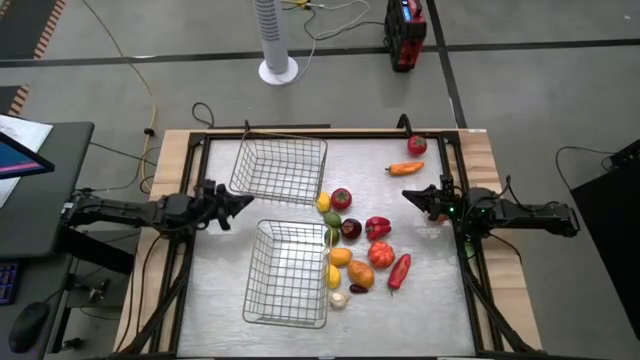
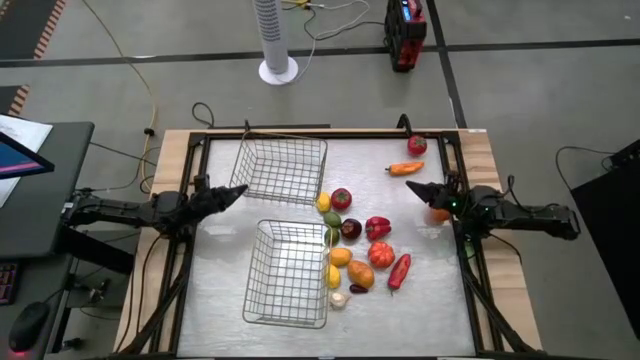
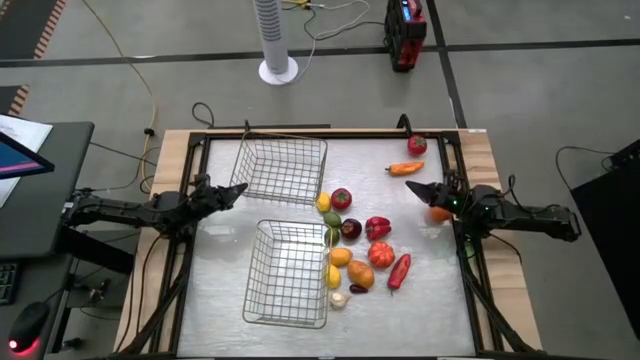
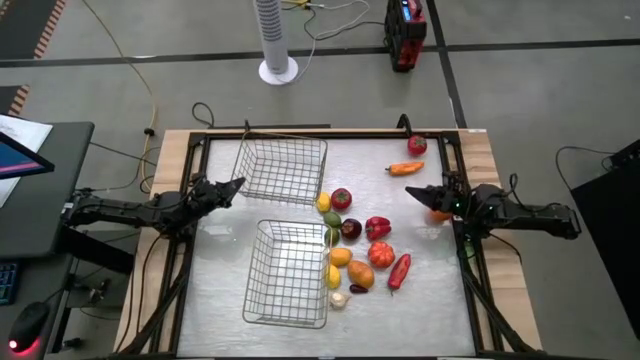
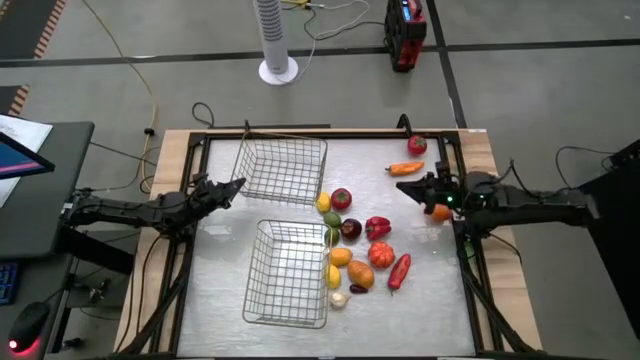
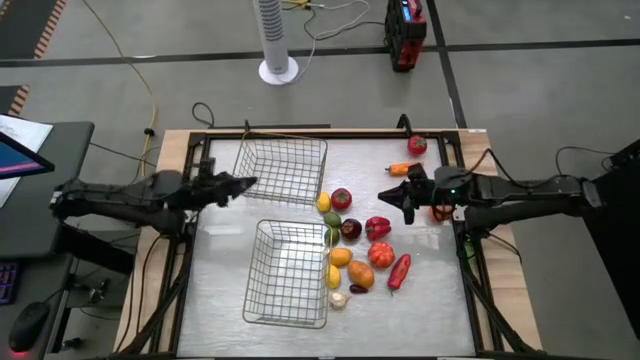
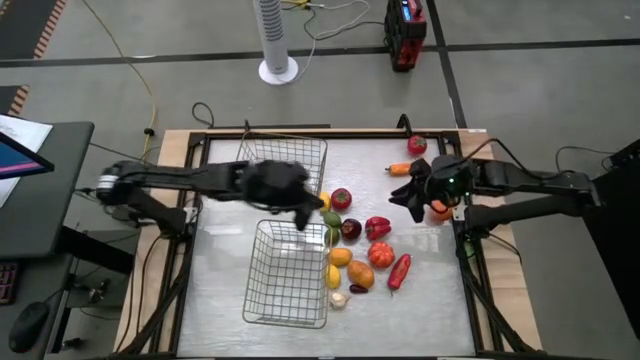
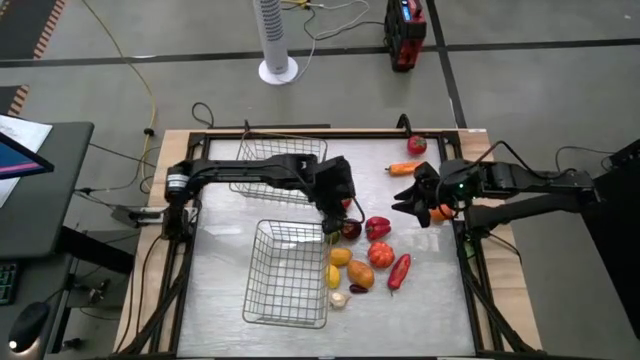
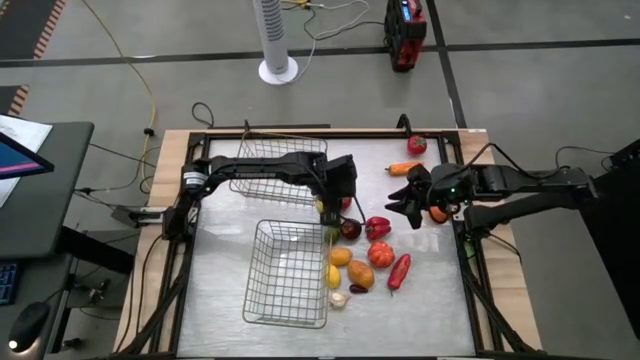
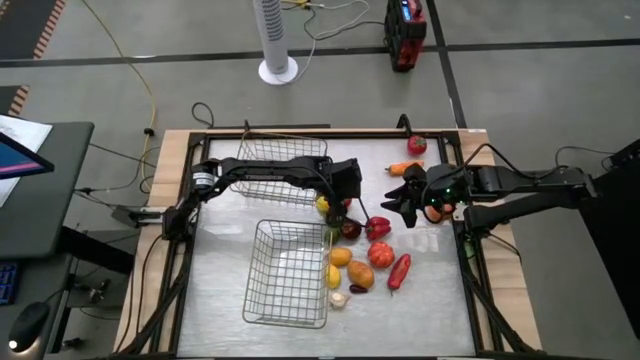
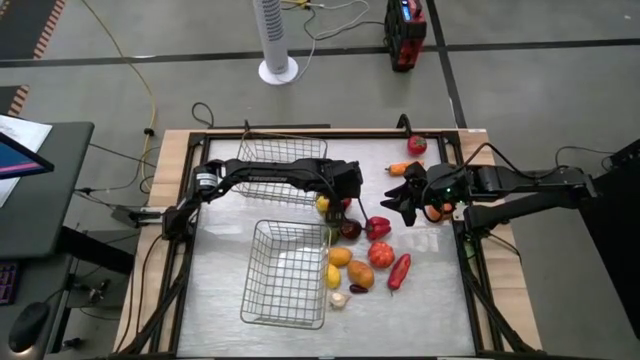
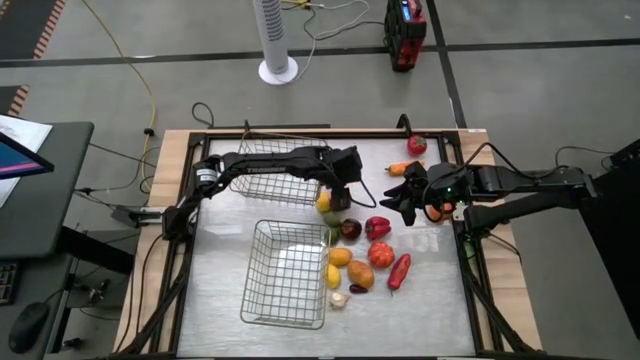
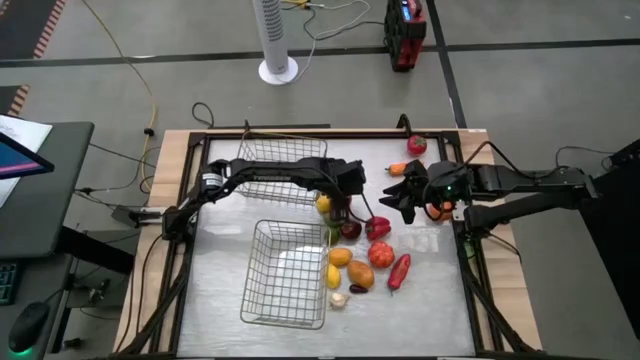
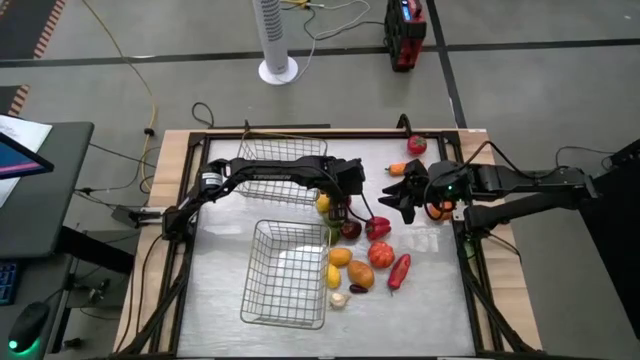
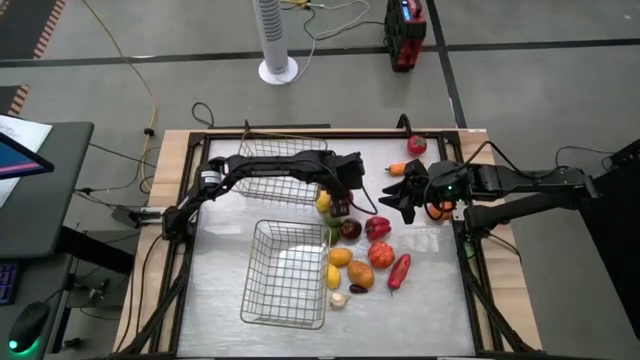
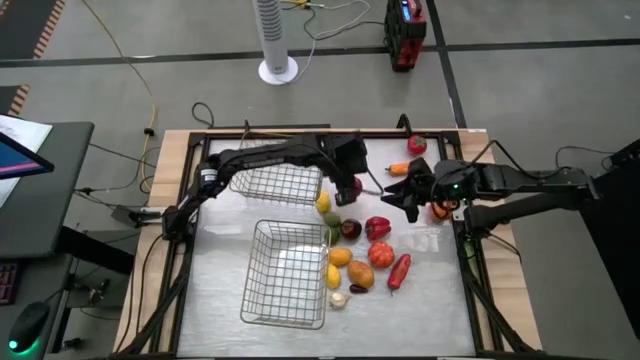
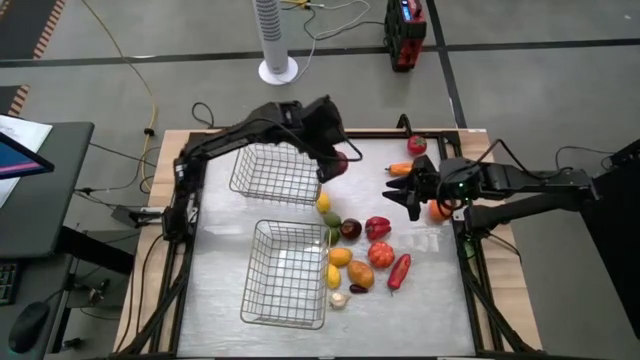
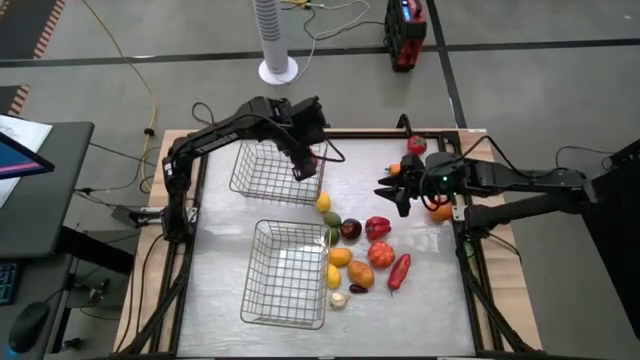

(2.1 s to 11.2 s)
Task: Sort produce into baskets
Put the bottom tomato into the top wire basket

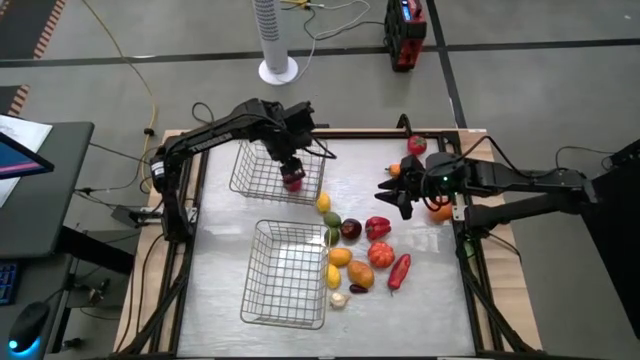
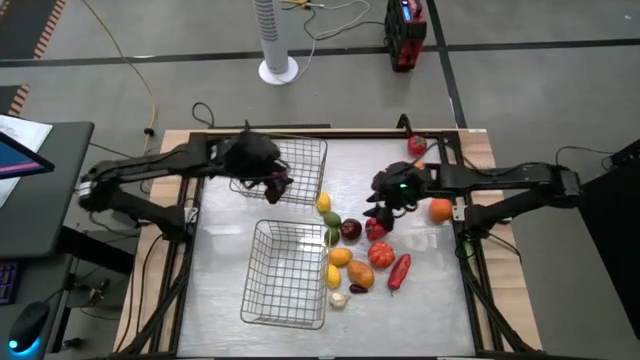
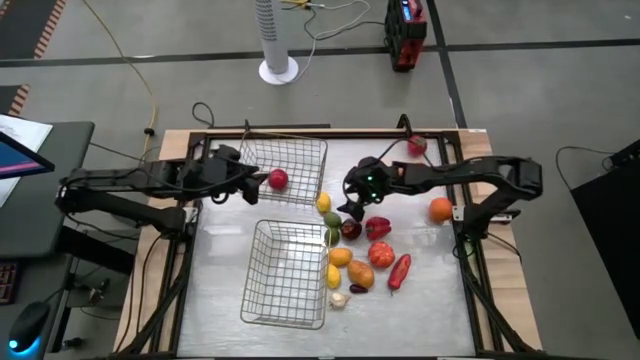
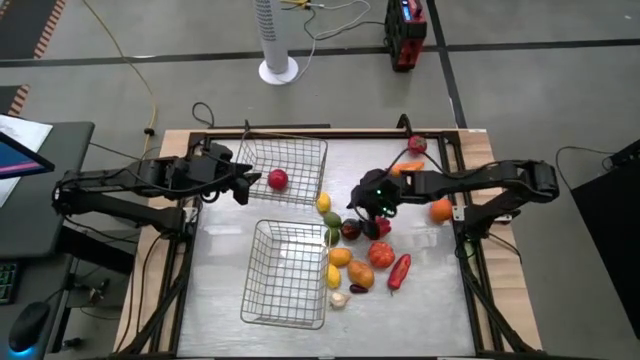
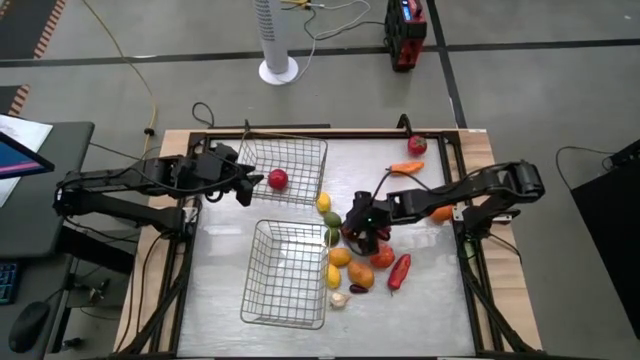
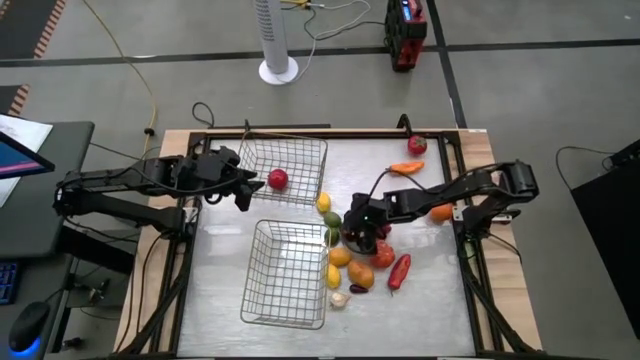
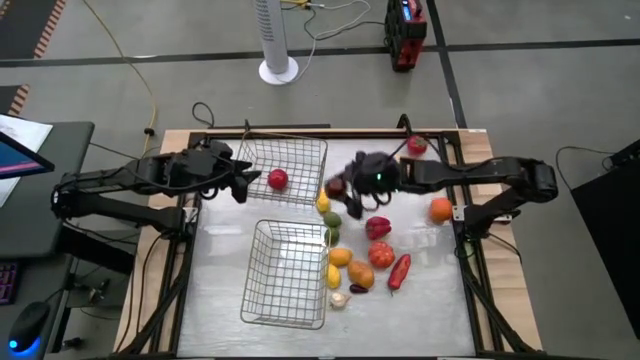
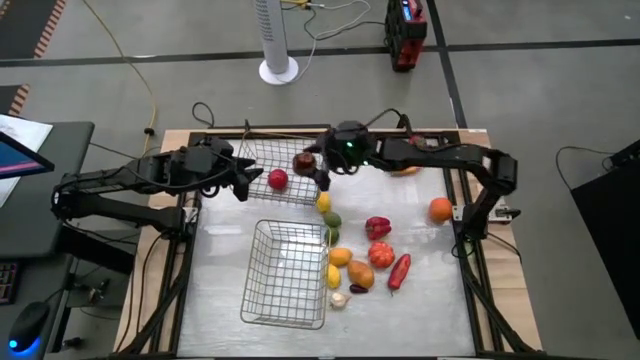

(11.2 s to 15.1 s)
Put the apple into the top wire basket

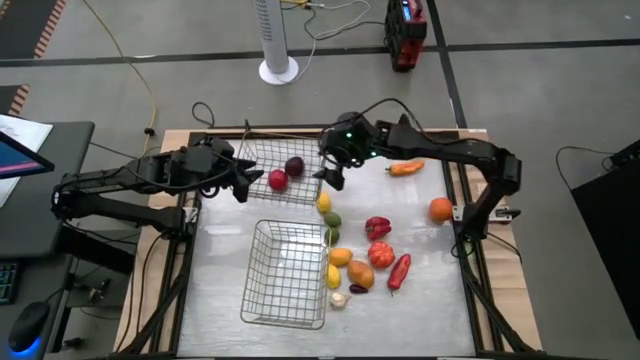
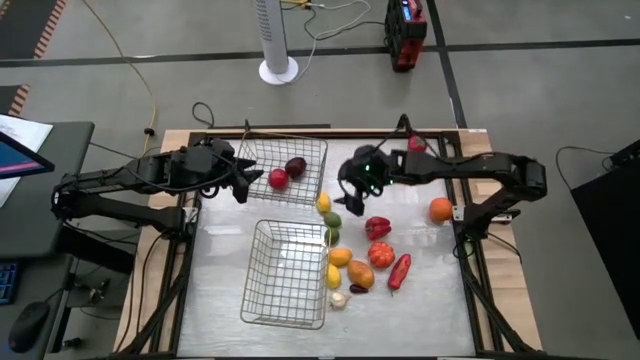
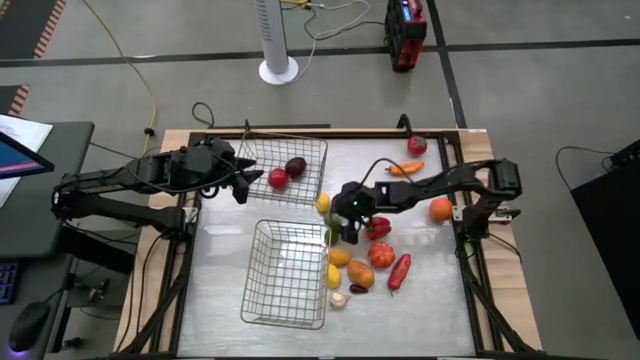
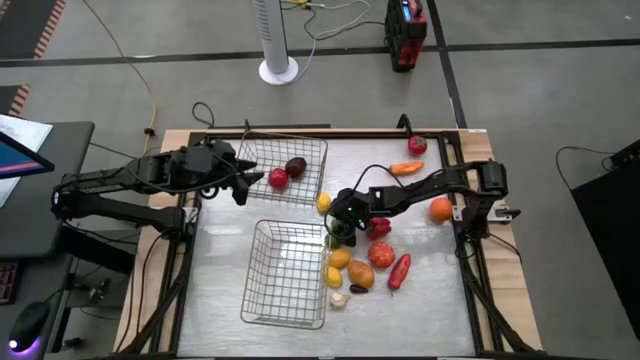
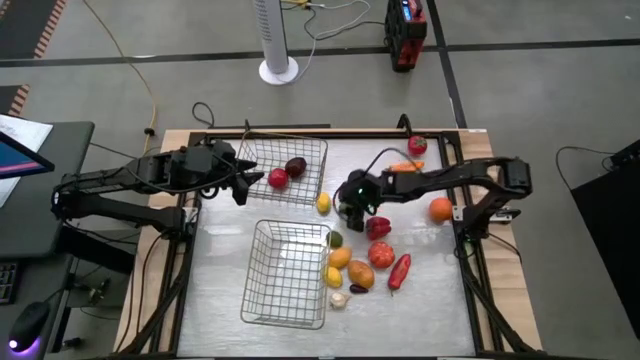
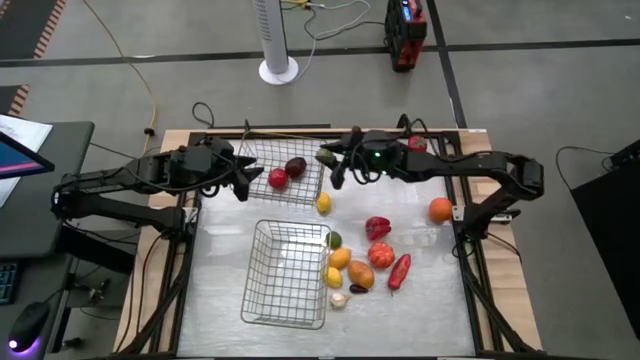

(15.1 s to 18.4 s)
Put the top lime into the top wire basket

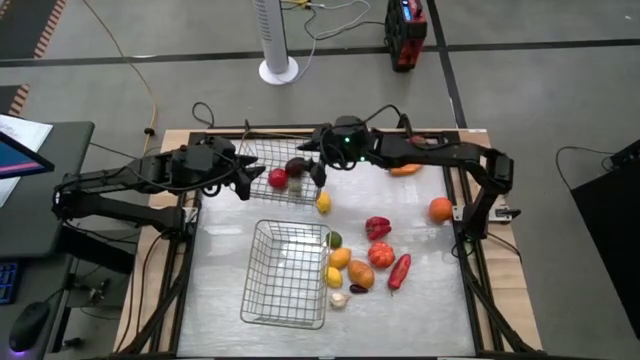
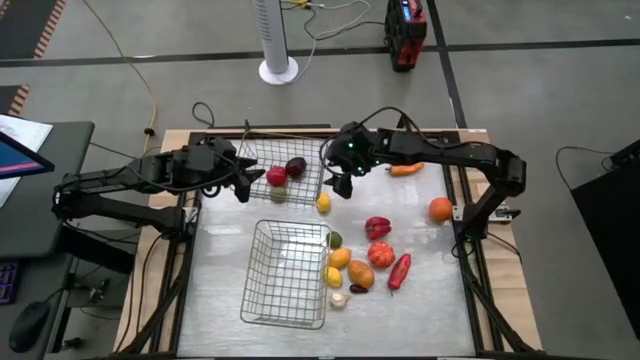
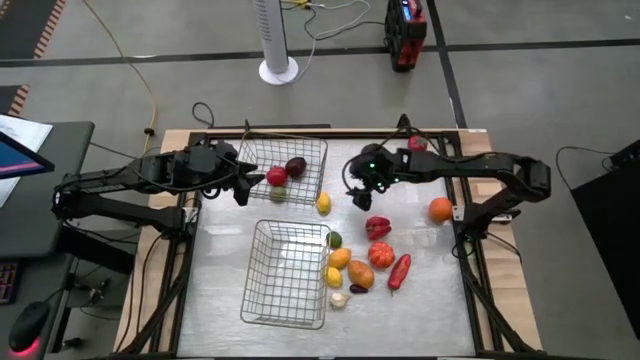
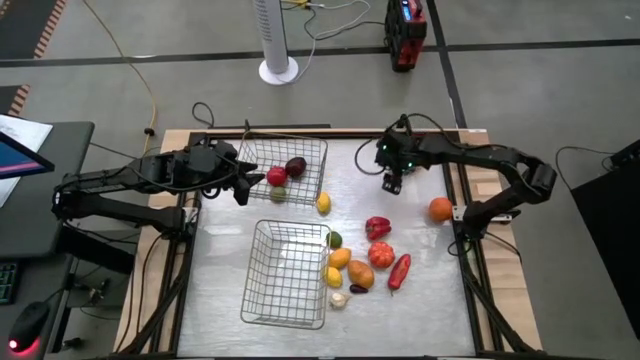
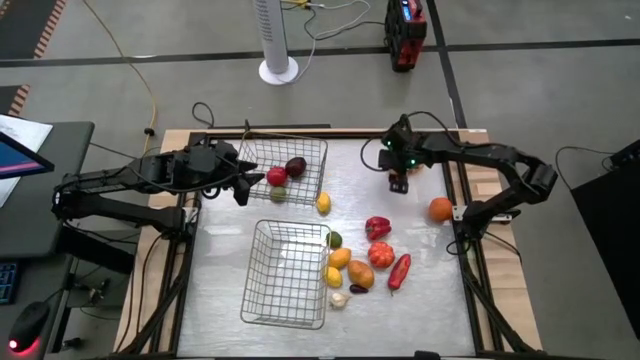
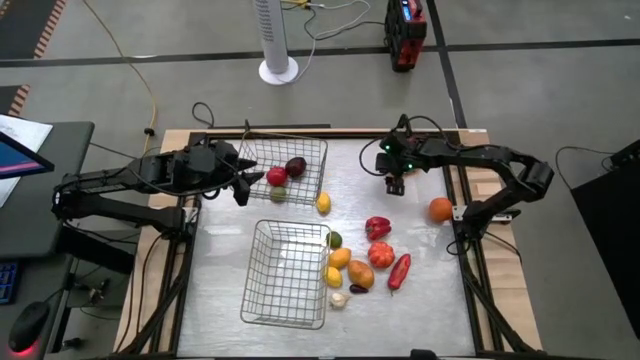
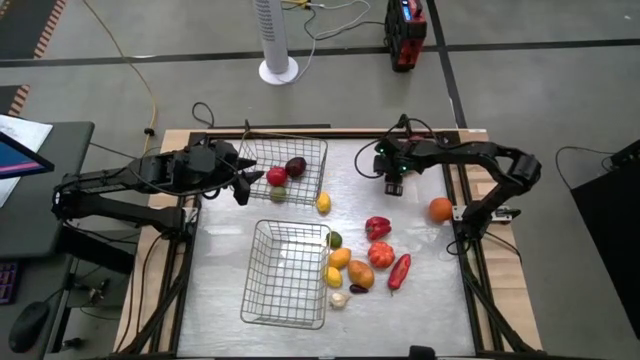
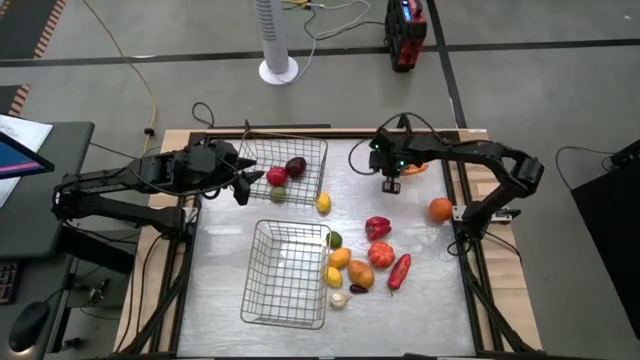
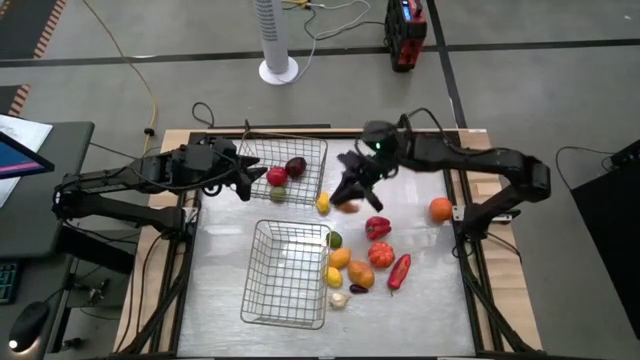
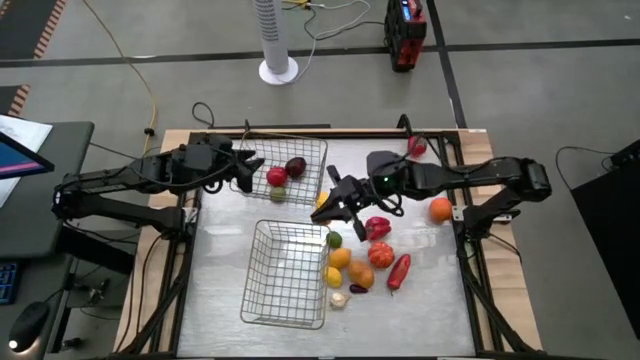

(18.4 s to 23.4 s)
Put the yellow chilli pepper into the bottom wire basket
